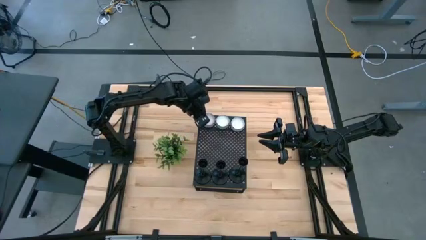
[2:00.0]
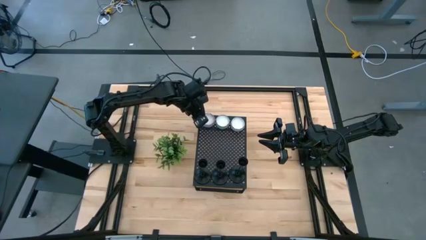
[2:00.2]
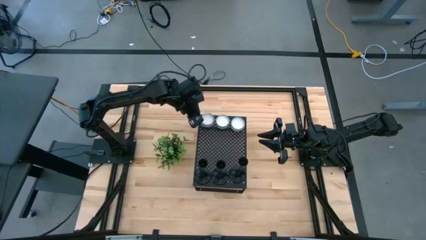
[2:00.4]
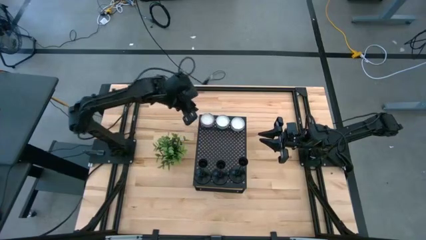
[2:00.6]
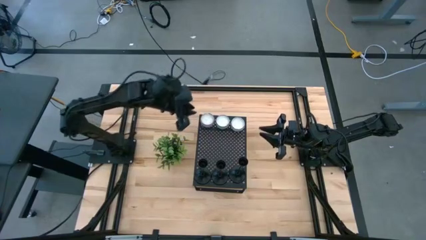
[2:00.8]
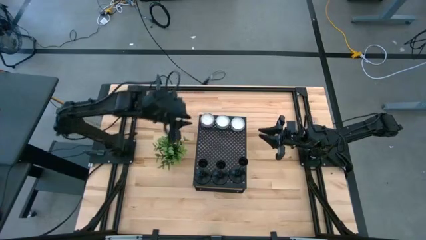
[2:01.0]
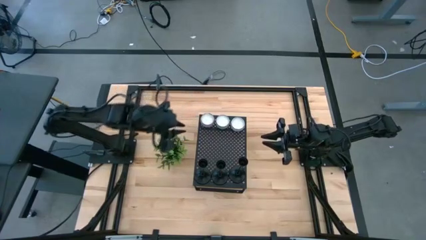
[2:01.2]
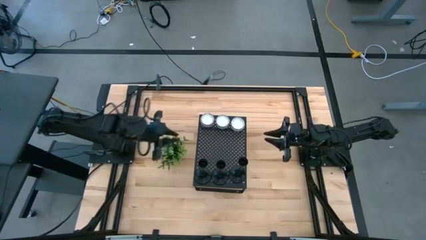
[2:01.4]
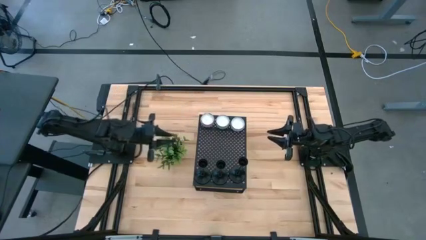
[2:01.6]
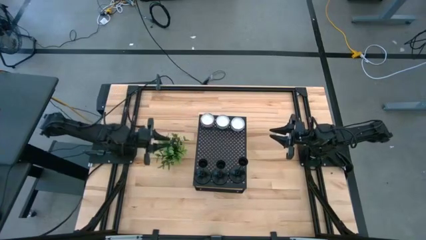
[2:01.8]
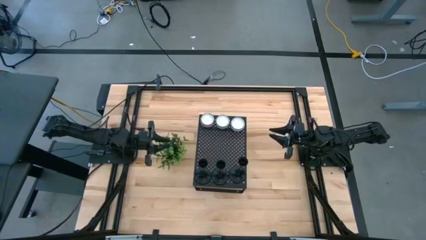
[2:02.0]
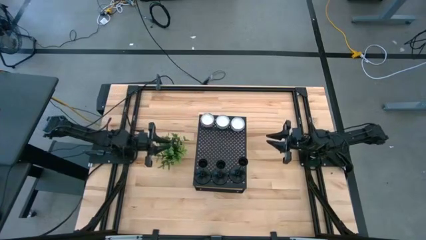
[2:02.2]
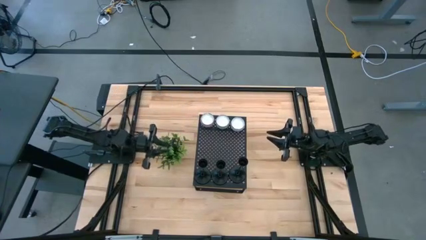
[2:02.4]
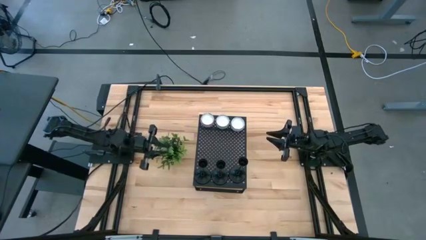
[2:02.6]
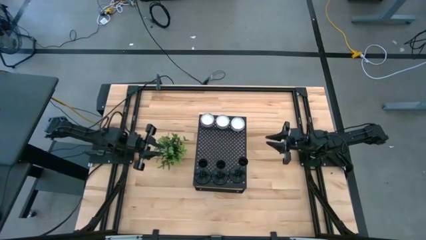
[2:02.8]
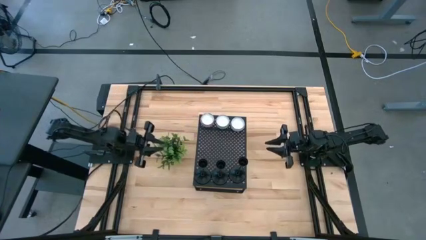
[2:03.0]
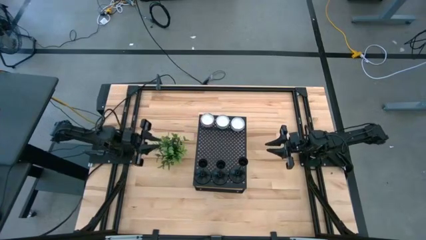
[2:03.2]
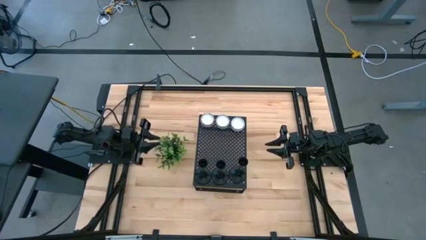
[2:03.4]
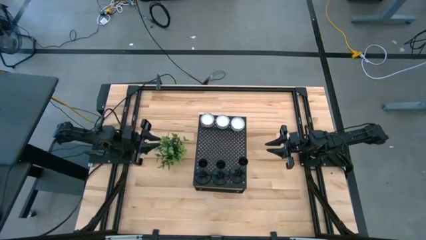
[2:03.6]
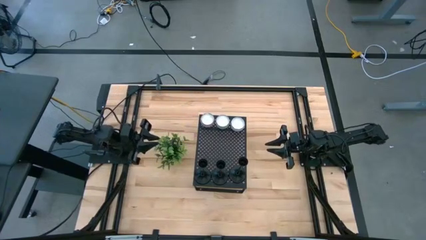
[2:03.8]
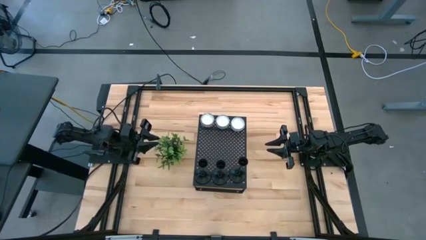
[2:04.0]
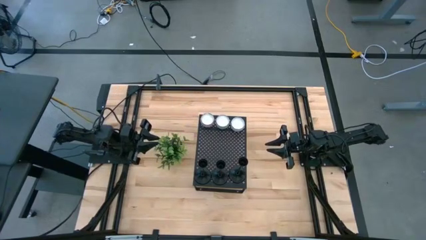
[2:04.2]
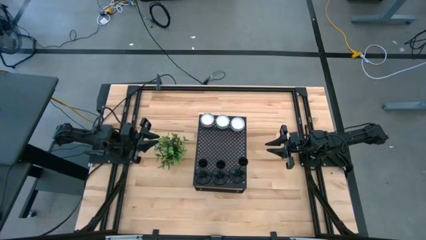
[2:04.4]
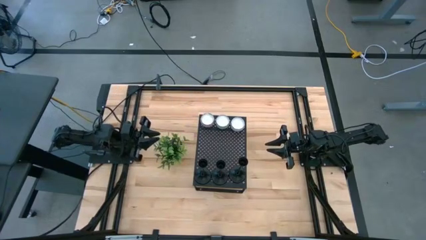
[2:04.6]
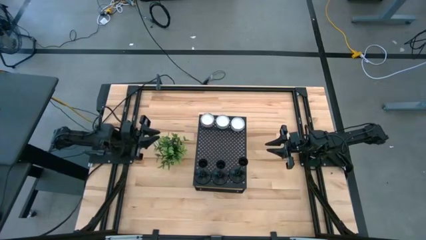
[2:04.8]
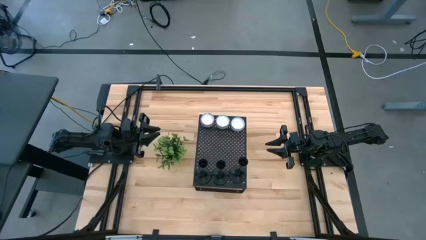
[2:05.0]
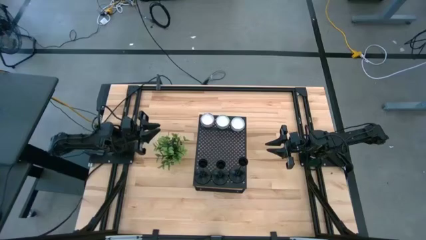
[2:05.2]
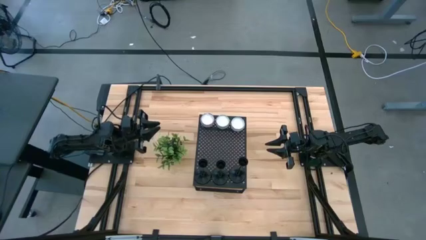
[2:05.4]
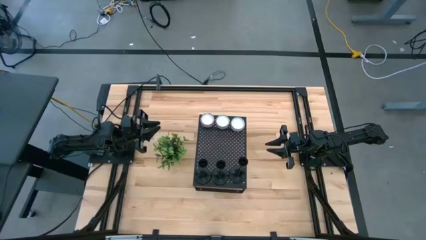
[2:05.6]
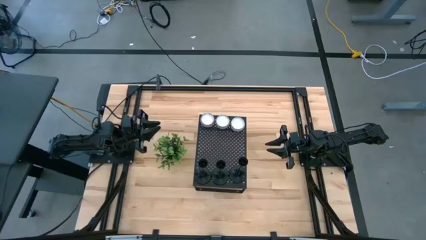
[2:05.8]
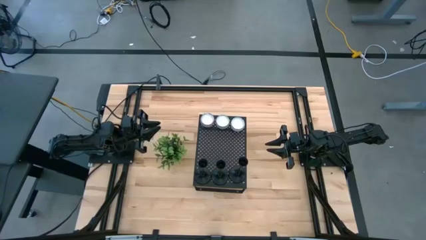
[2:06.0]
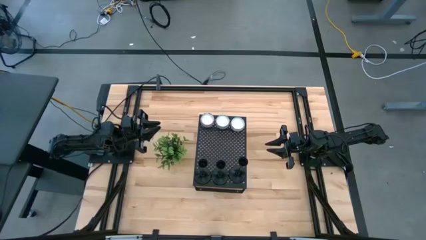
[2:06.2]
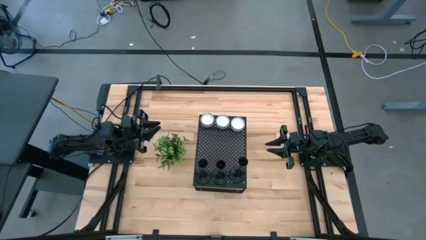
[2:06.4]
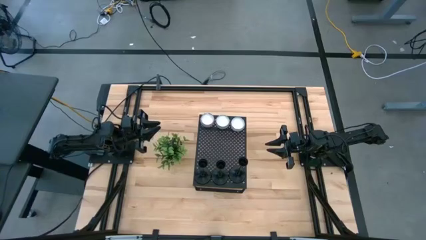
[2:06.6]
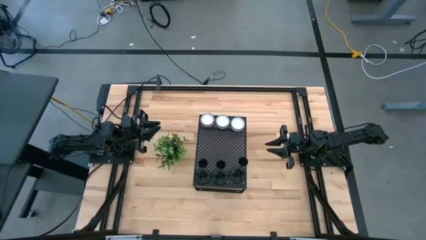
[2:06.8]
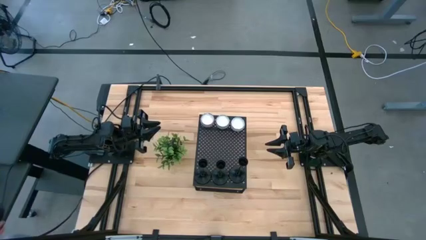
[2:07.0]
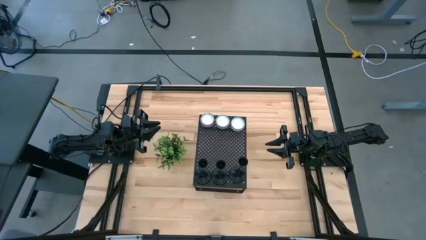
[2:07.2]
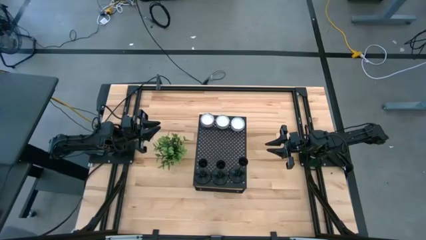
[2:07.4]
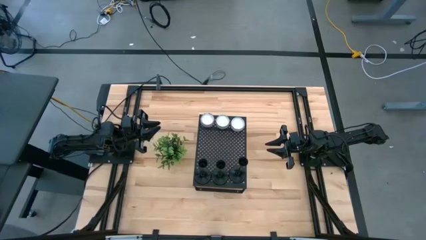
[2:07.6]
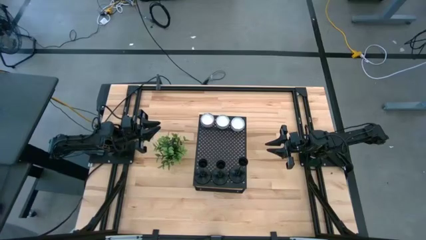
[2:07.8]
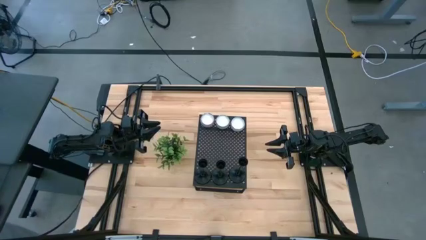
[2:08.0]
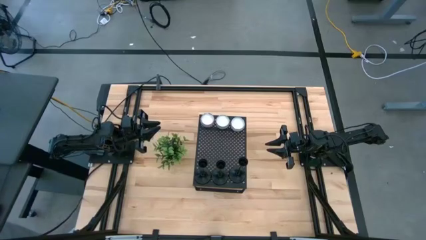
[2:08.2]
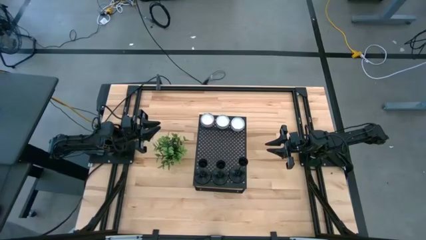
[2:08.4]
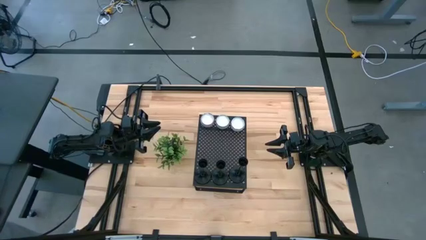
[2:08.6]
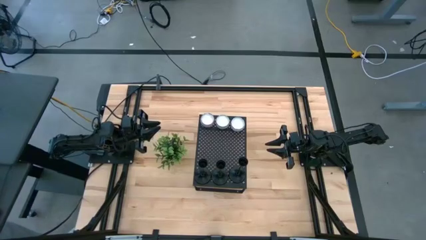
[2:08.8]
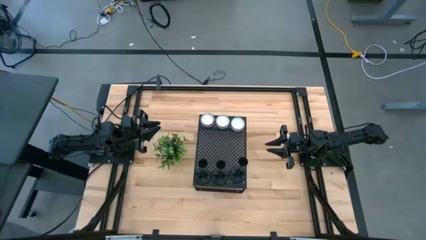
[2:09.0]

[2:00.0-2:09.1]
Task: Pick & Place candle stick holders
Return to Home Position

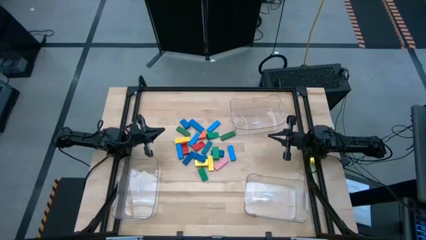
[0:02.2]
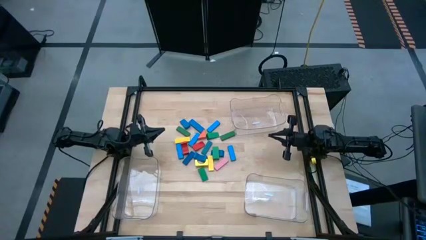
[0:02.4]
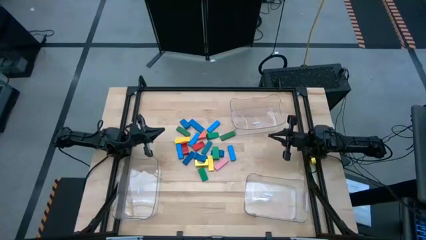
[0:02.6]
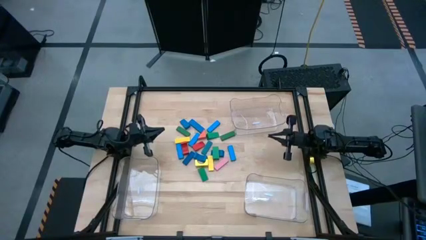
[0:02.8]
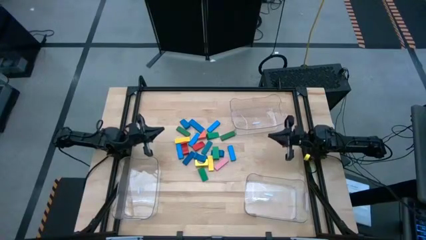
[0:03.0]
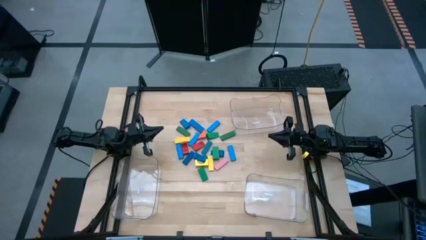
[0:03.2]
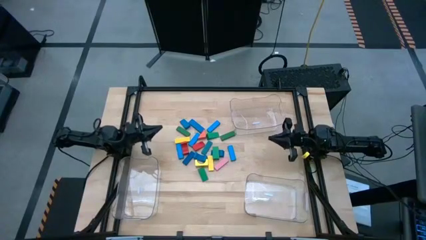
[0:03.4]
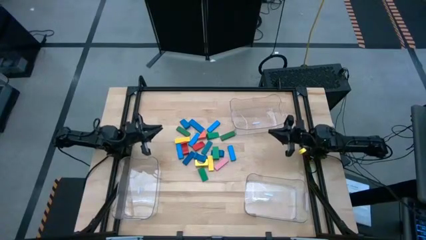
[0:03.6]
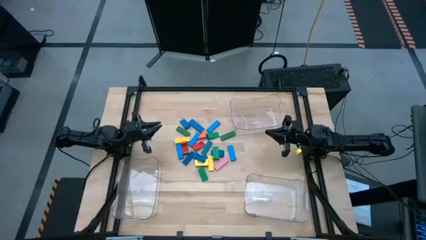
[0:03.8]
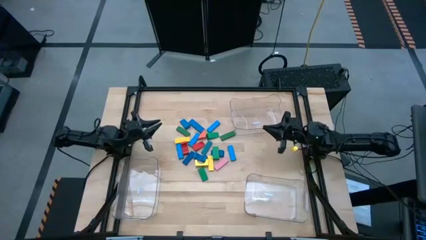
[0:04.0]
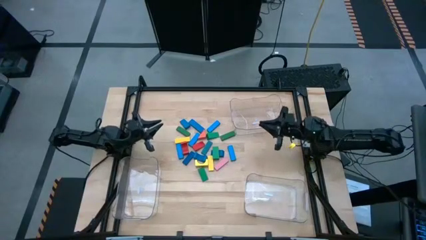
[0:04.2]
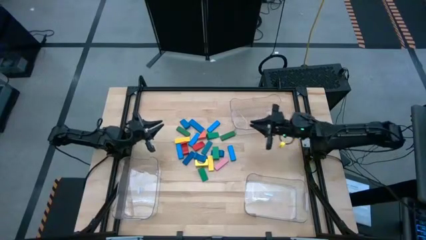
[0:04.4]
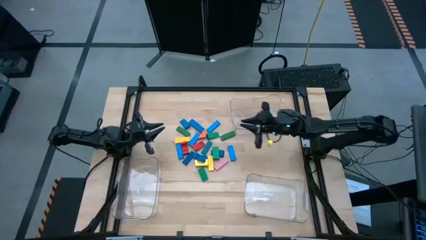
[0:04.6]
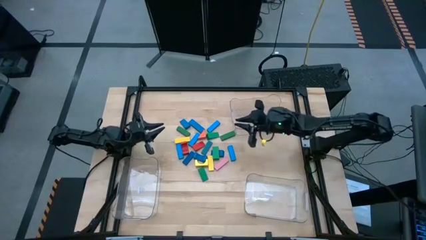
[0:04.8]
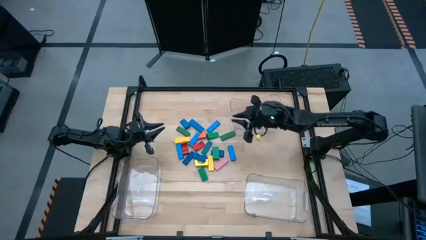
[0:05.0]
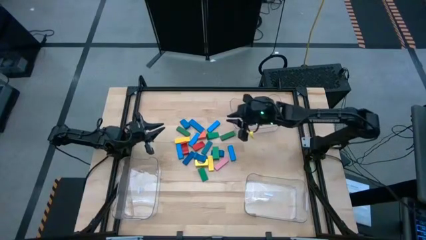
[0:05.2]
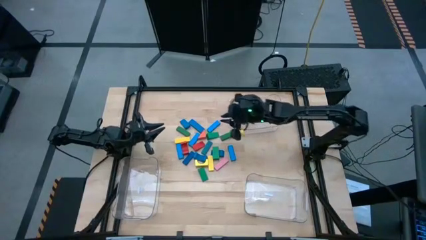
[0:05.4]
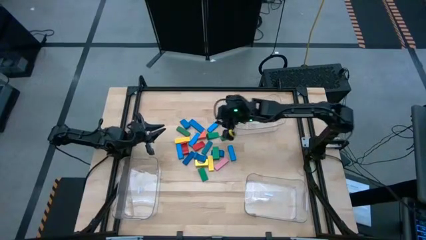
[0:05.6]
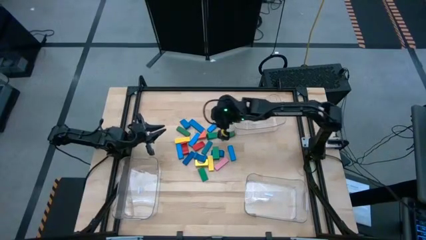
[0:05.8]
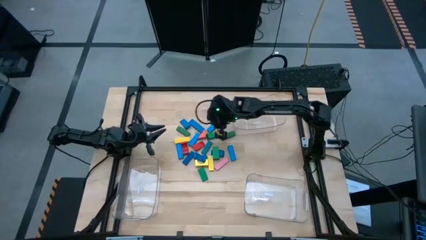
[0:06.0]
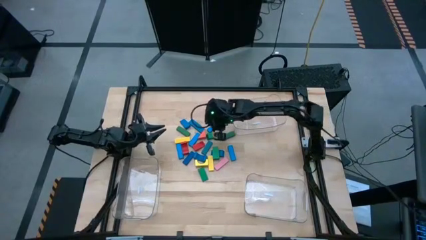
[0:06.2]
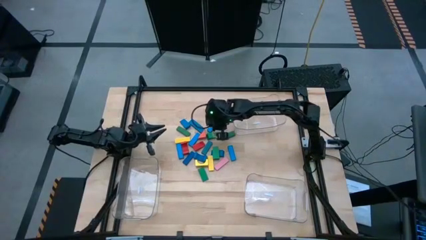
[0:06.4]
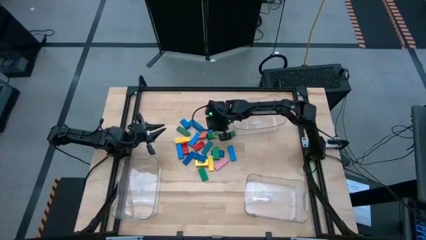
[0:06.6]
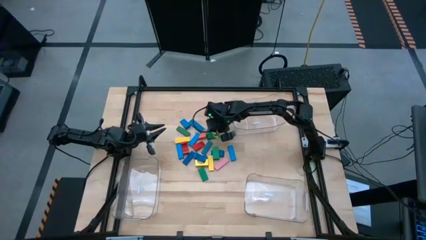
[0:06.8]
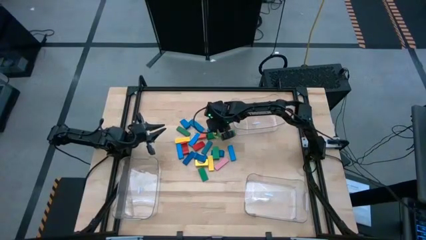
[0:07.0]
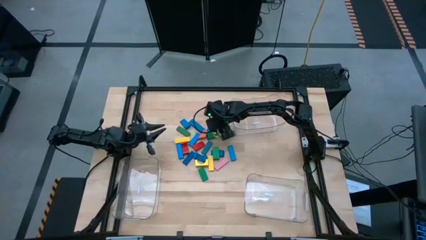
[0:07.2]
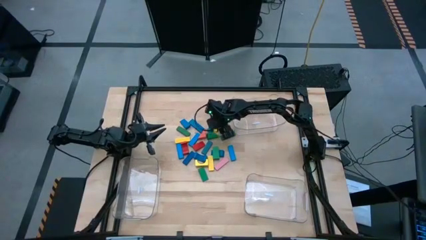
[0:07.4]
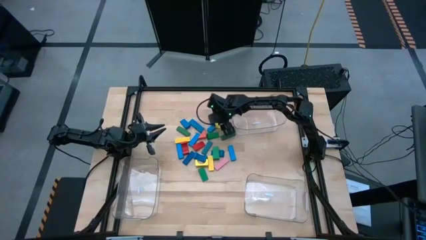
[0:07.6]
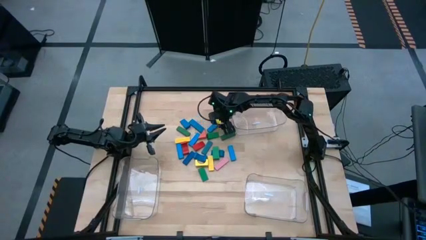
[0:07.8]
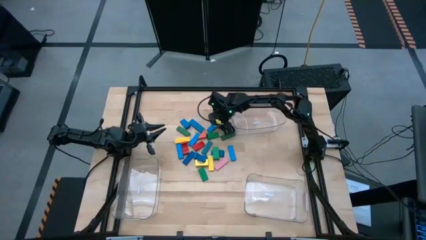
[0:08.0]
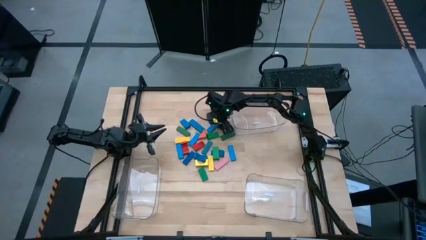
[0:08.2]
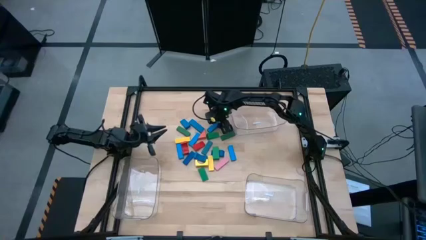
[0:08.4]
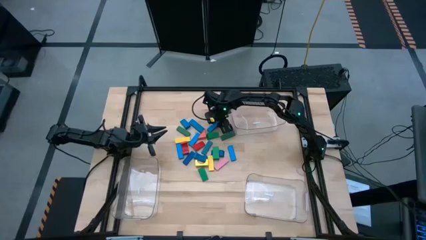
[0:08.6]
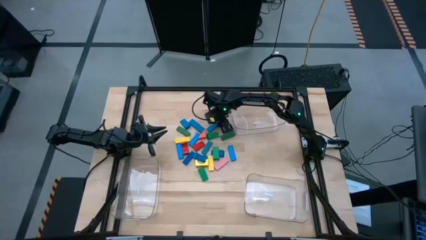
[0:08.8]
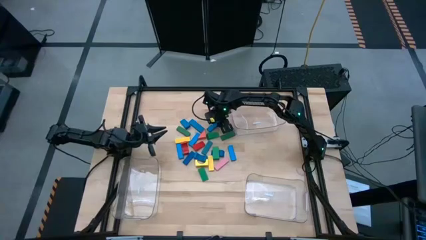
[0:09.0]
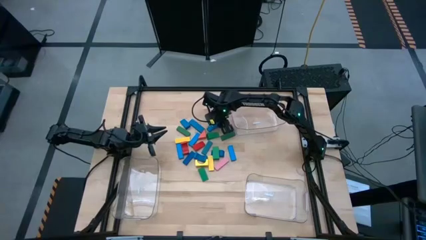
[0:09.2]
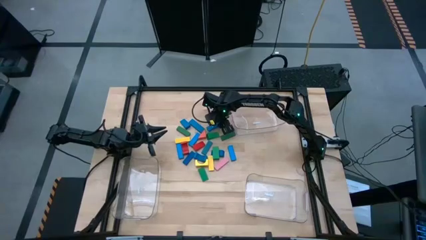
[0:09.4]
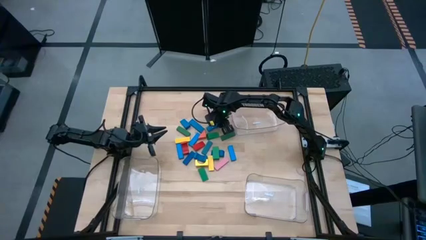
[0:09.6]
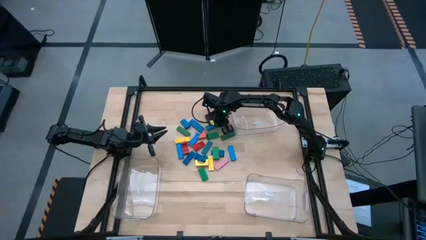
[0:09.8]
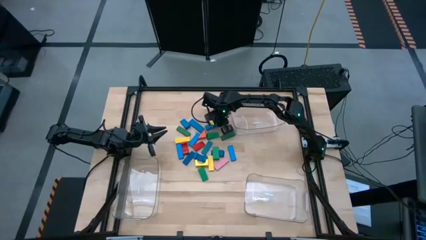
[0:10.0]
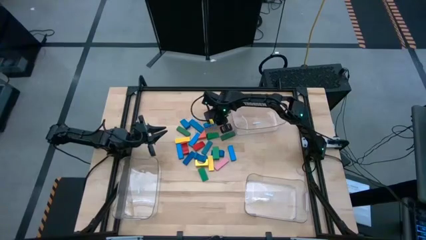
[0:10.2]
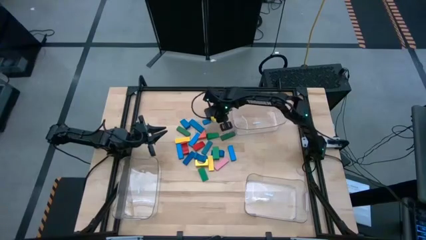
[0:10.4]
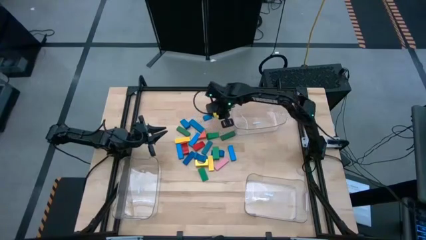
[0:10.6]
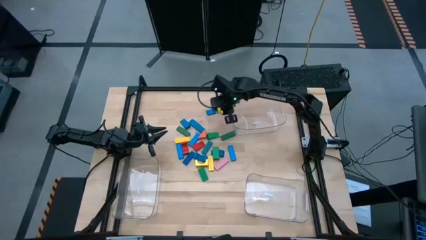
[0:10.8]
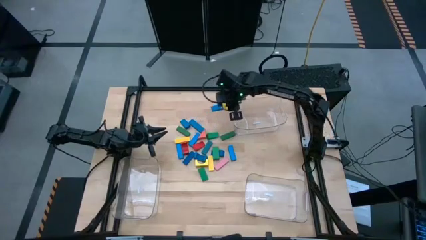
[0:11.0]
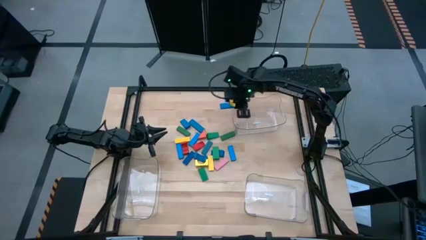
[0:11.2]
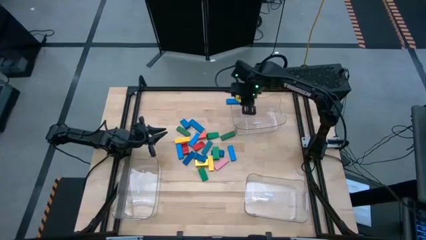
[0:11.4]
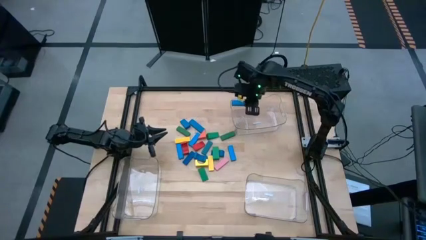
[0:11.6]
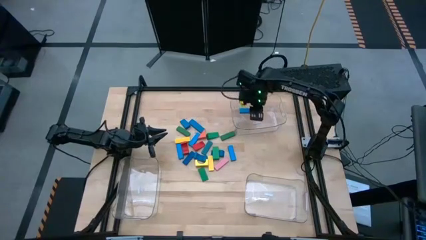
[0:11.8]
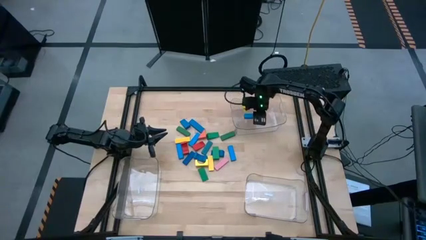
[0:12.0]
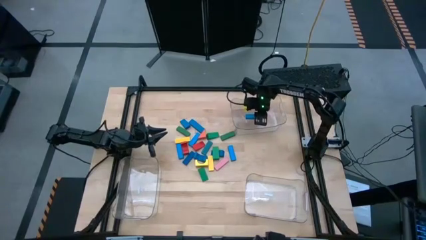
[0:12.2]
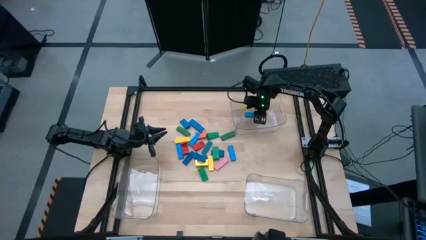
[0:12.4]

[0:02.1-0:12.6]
Task: Sort blocks by size
Put the blue rectangle block into the top transparent bin
